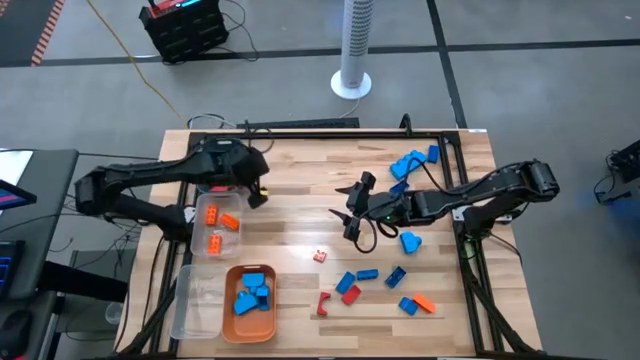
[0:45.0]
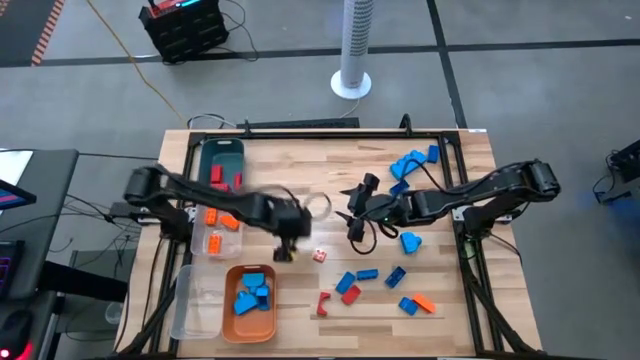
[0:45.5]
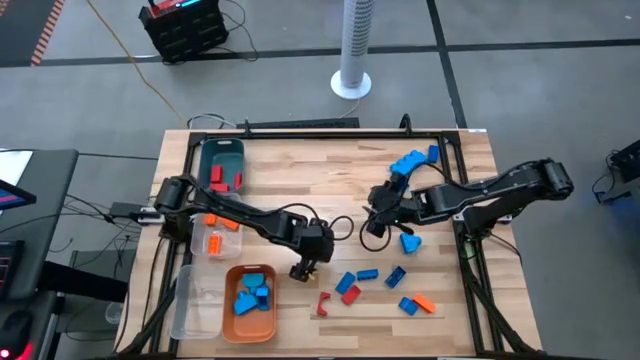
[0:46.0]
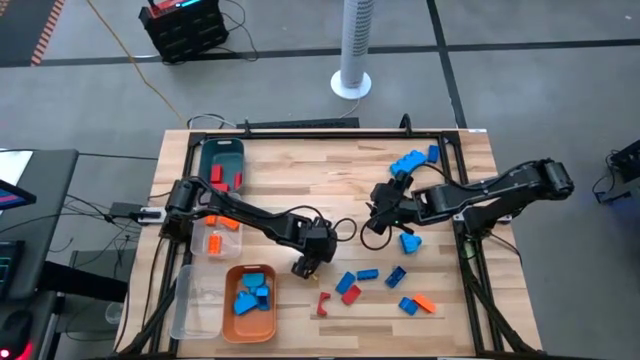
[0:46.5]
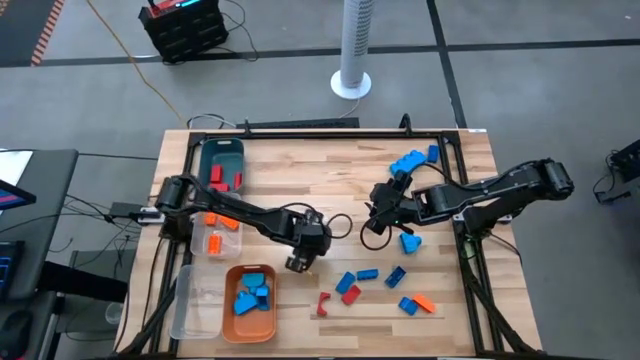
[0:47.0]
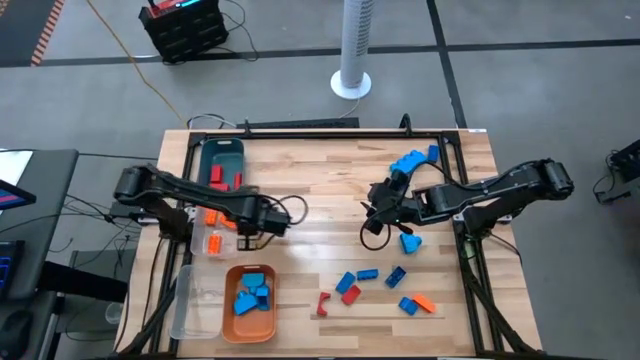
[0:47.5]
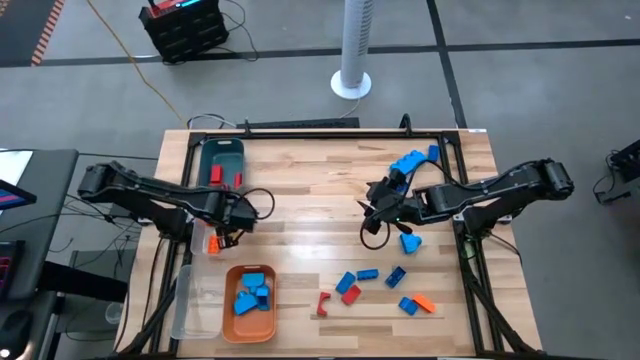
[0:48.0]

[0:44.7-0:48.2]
Task: Sort blocks
Put the orange game piece into the top transparent bin

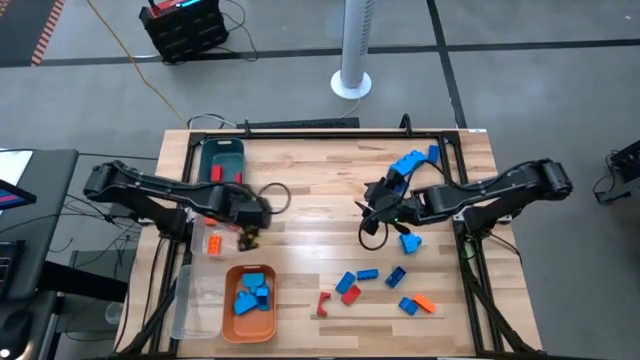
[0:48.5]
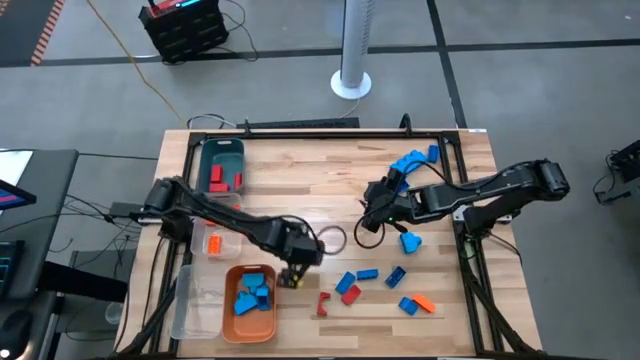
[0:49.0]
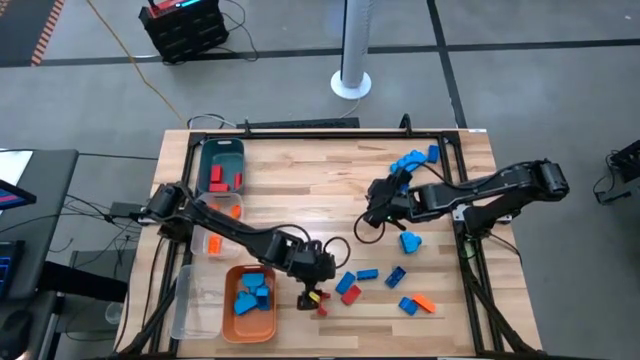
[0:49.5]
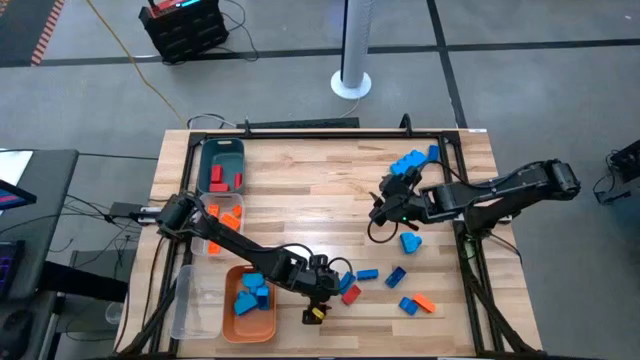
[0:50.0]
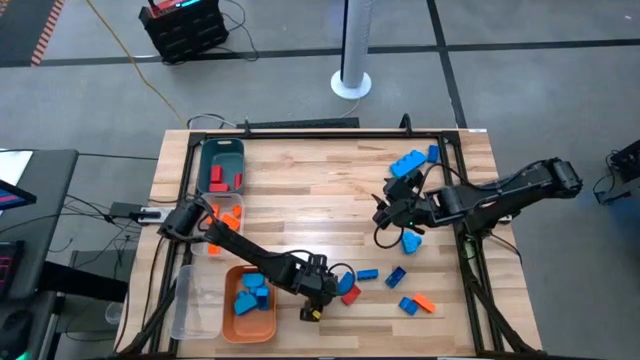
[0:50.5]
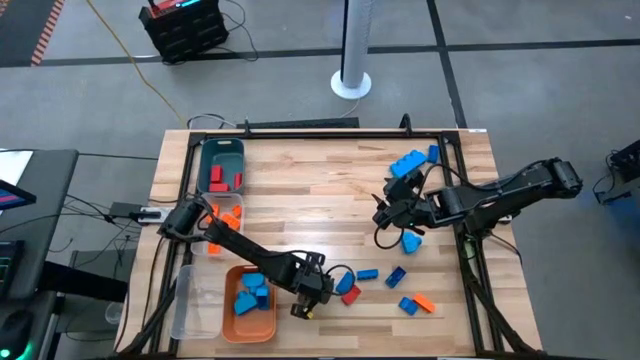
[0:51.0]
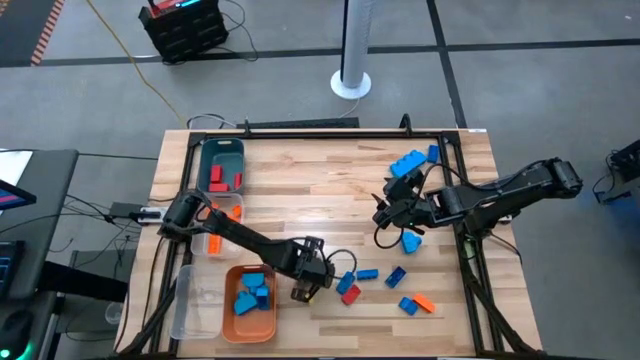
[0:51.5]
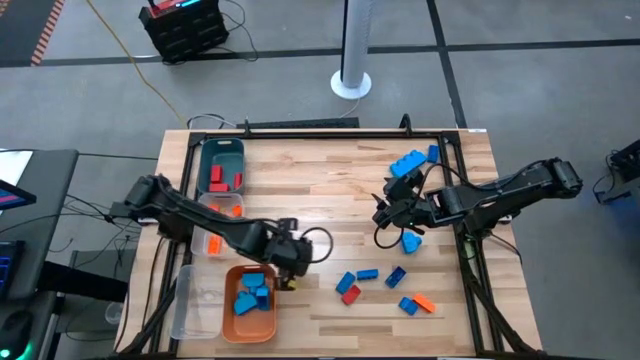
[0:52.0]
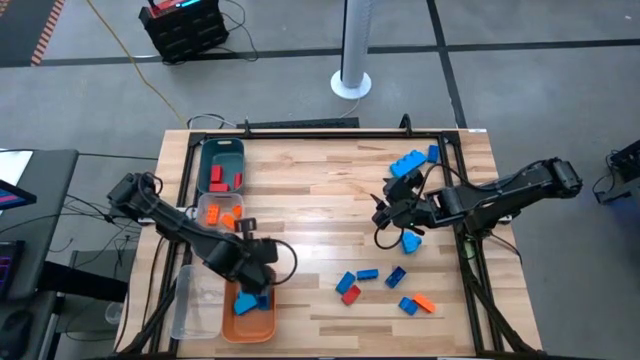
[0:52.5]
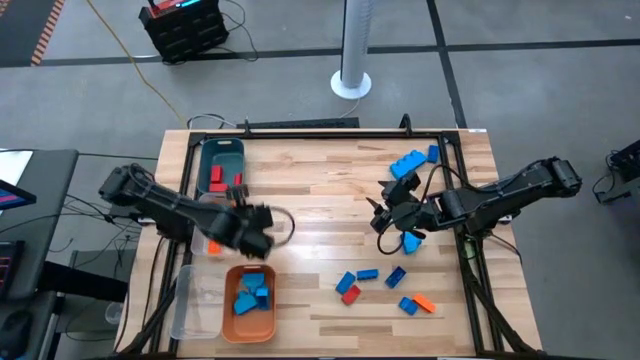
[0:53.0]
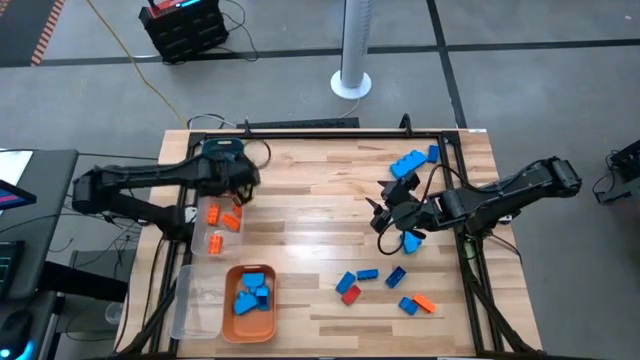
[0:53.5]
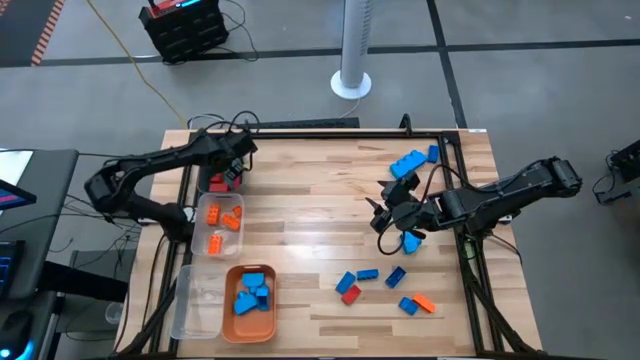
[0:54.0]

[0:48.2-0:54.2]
Put the red block into the blue bin

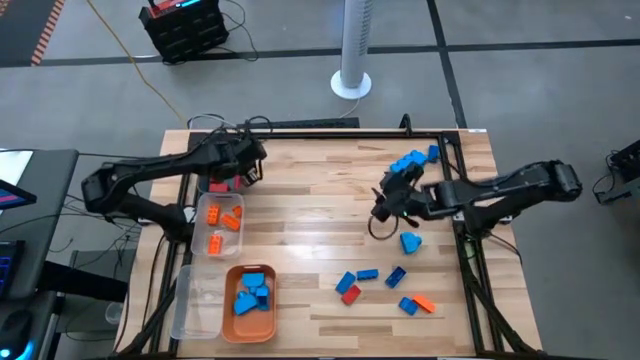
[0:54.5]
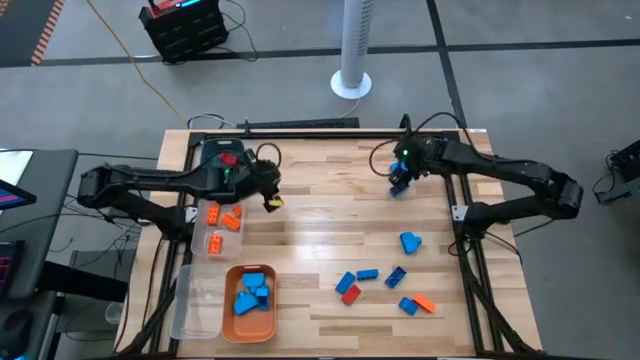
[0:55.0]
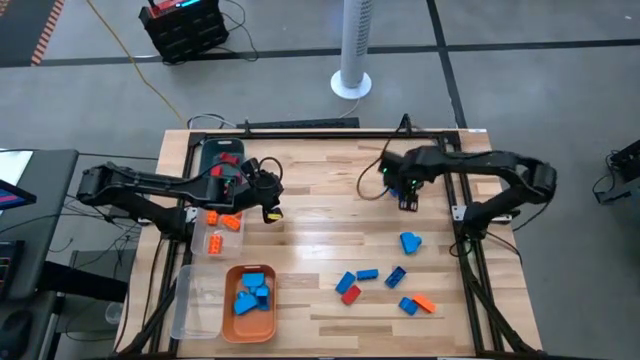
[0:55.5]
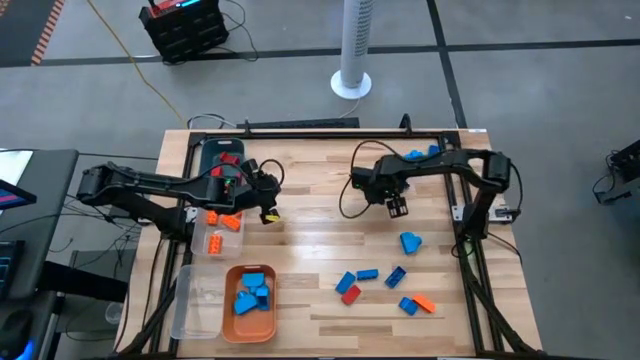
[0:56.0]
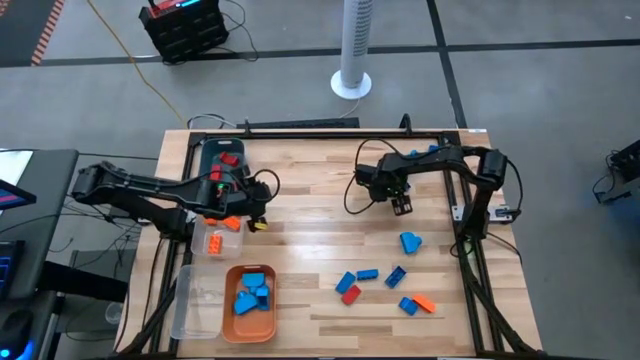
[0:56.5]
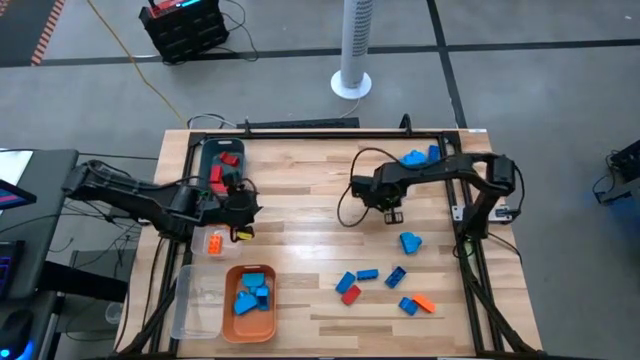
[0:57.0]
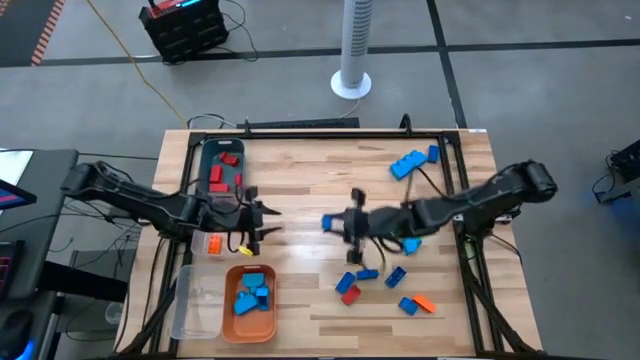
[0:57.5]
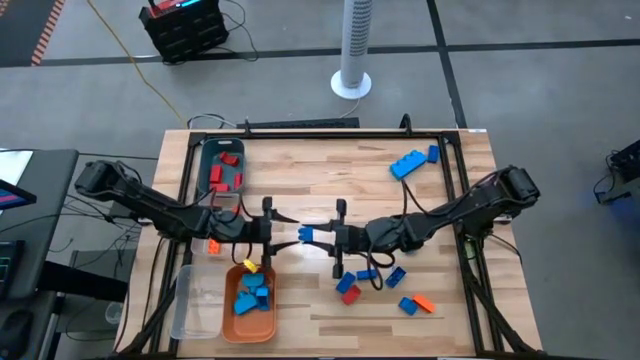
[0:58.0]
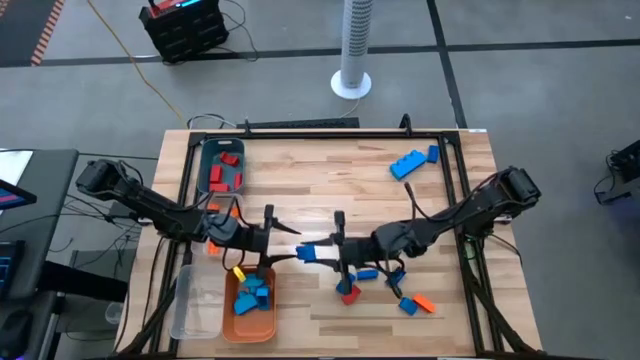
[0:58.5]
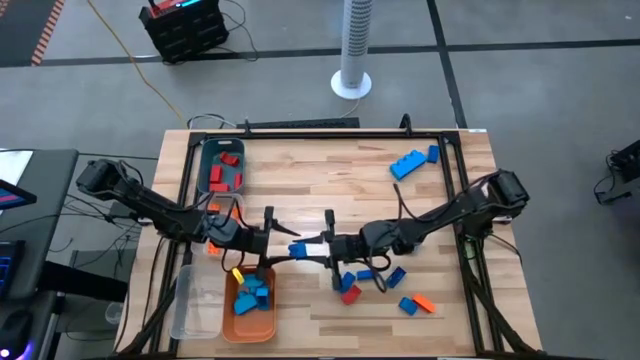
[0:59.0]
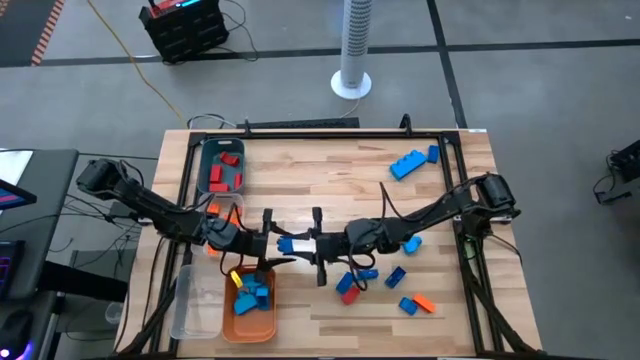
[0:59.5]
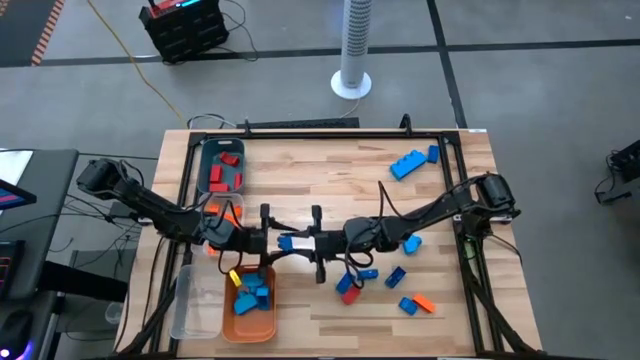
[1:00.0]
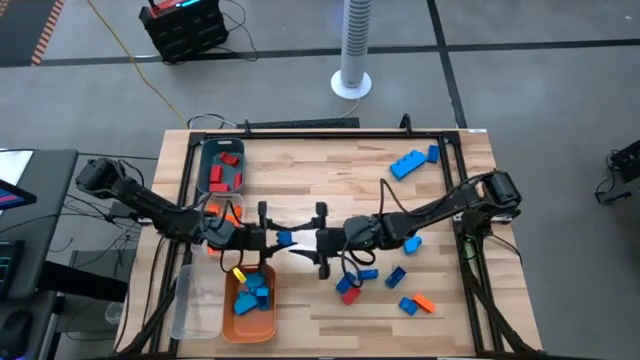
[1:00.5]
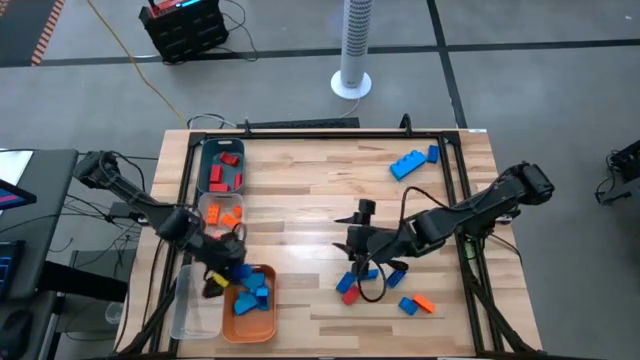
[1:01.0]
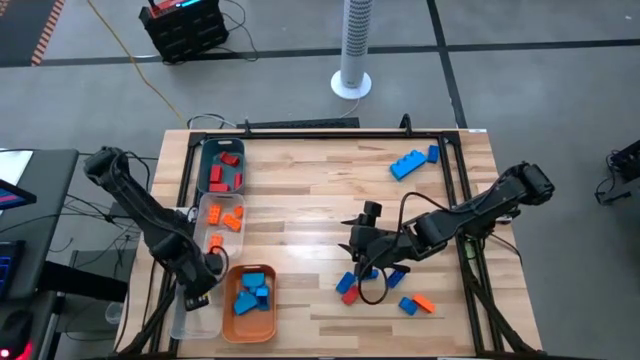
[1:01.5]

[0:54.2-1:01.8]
Put the blue game piece into the bottom transparent bin

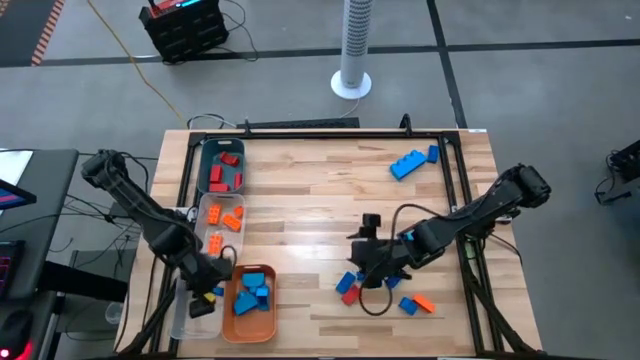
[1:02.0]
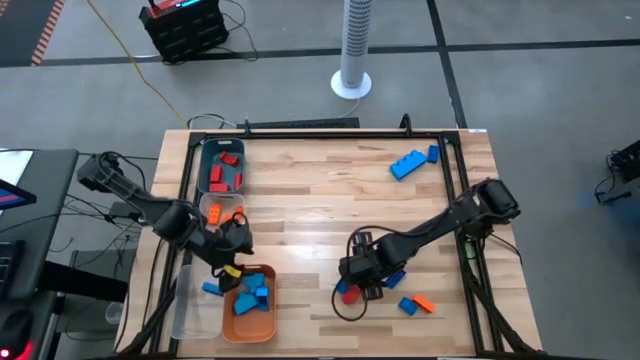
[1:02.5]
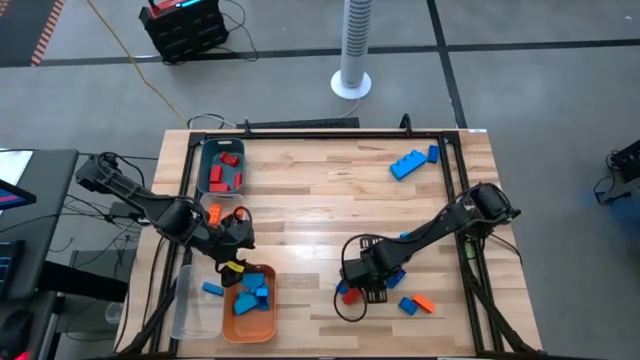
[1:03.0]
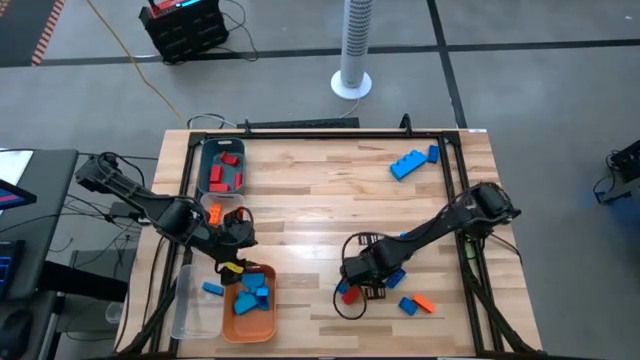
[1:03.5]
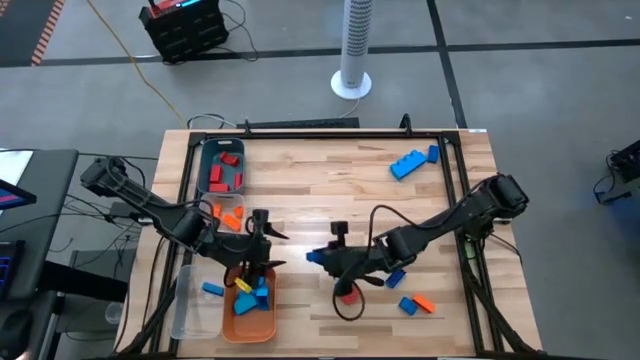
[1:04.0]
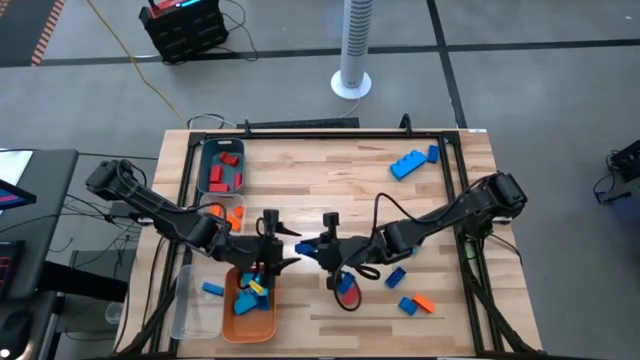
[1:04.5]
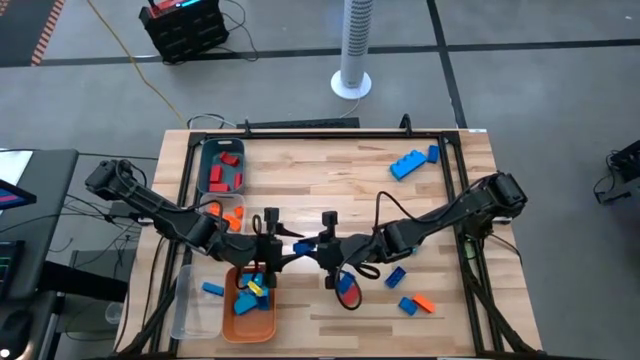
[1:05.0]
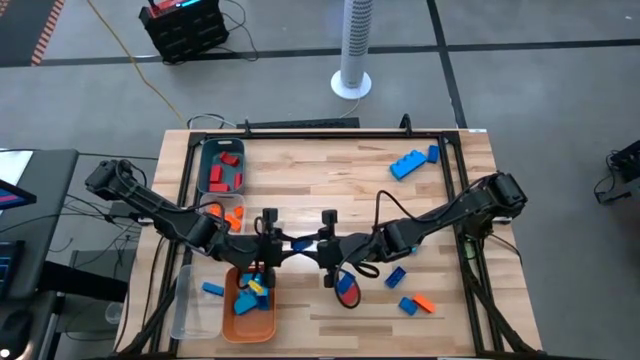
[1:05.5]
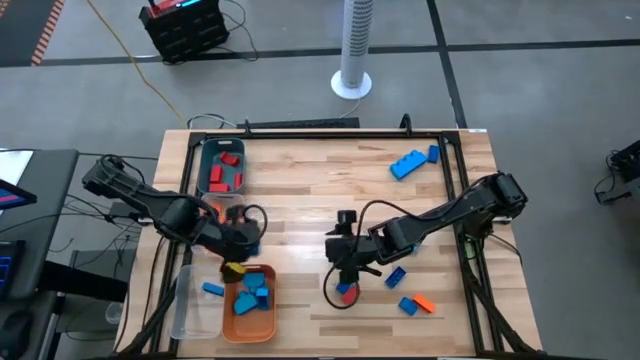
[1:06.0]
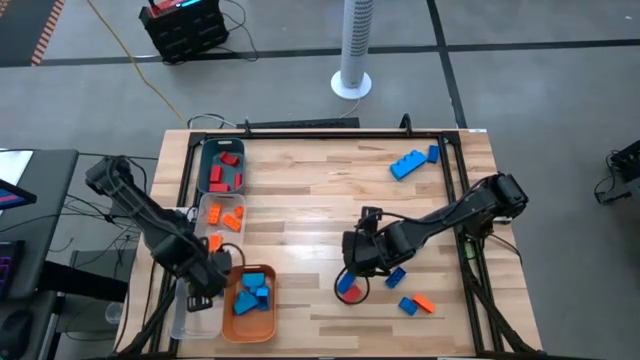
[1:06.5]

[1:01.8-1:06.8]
Put the blue game piece into the bottom transparent bin
